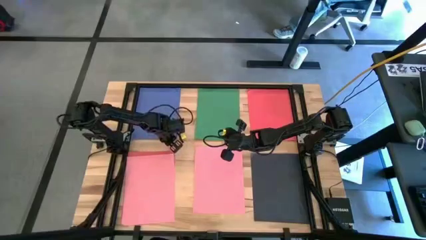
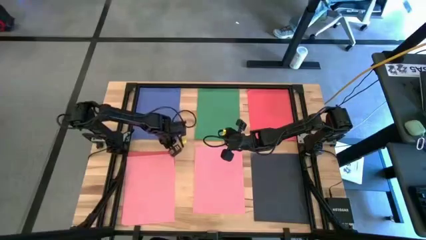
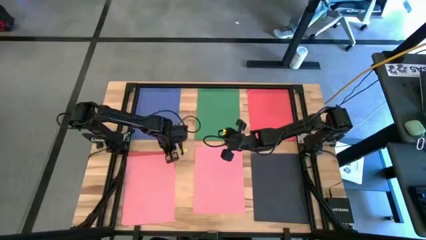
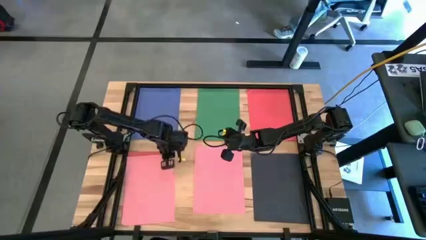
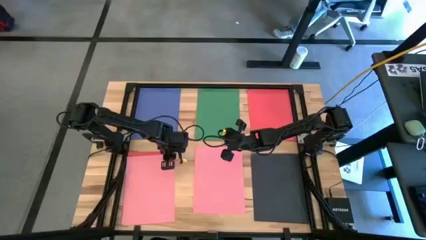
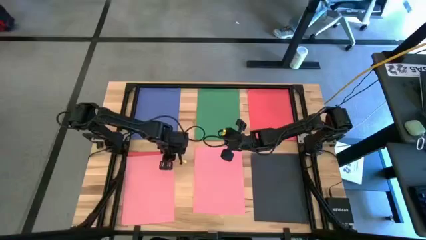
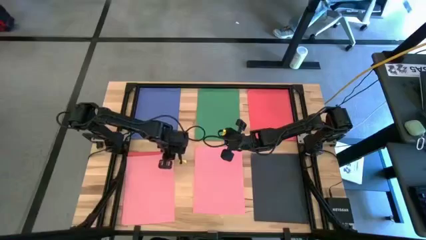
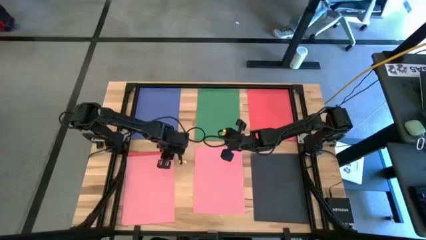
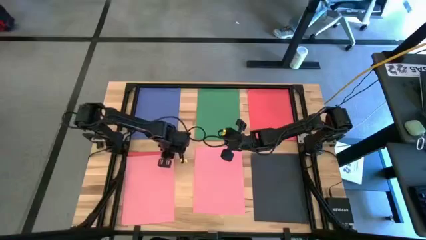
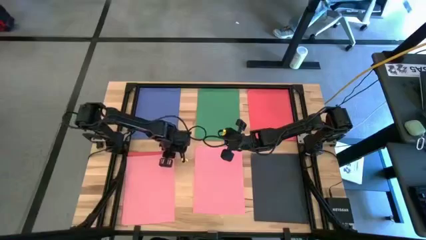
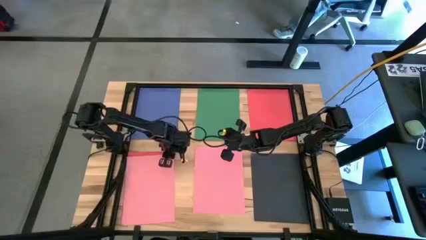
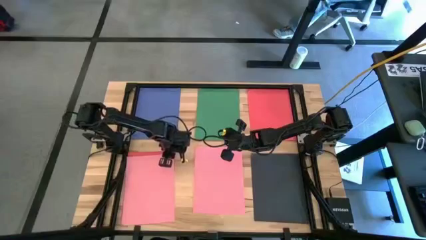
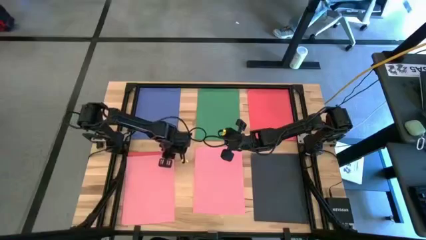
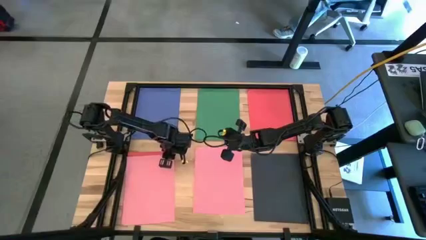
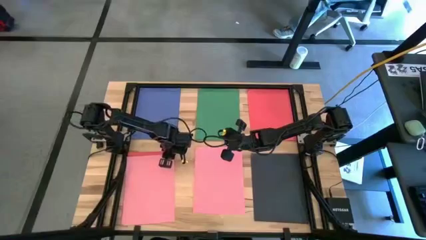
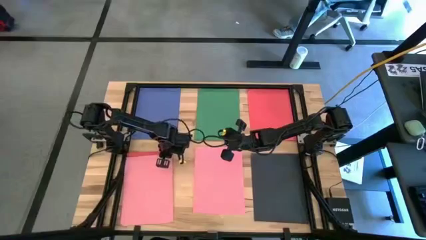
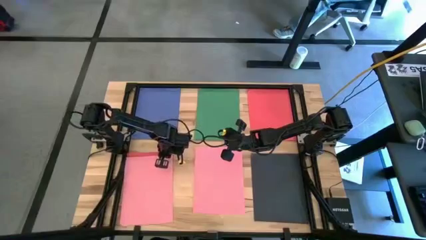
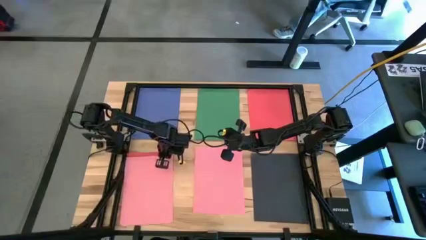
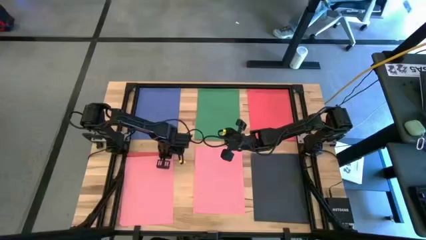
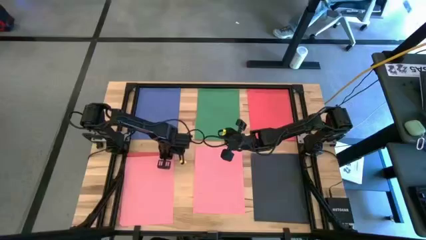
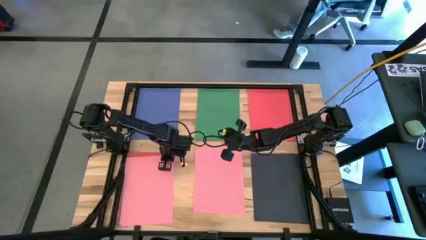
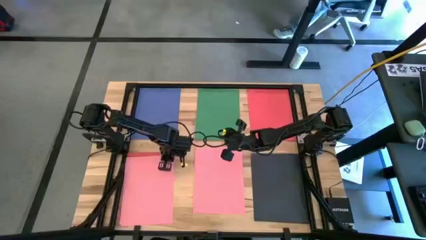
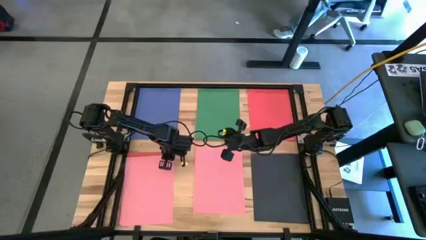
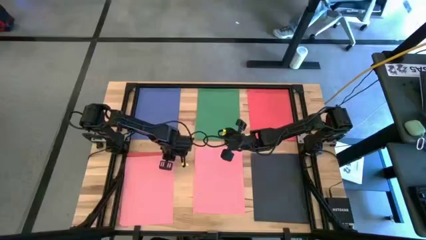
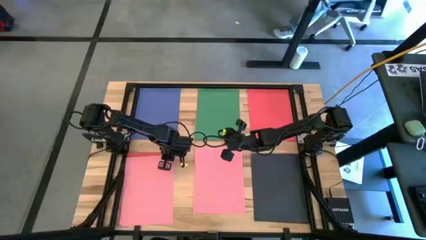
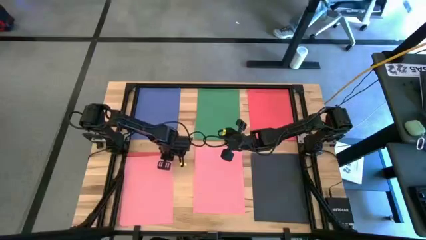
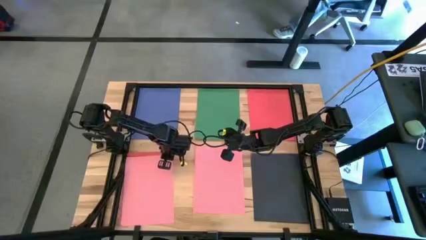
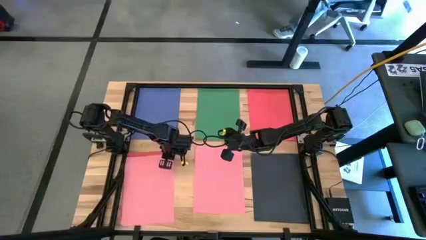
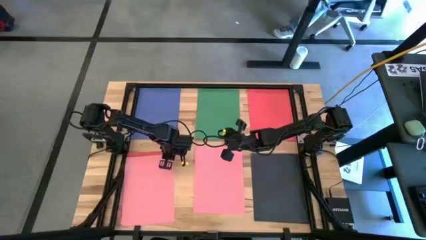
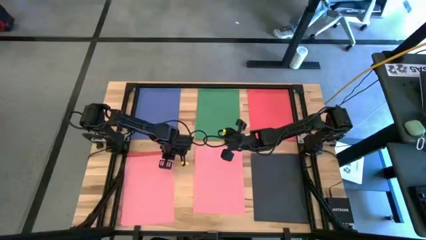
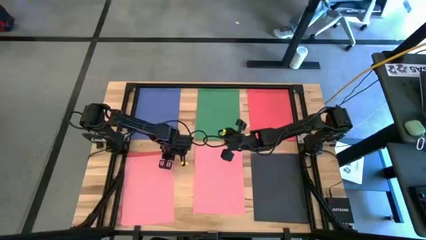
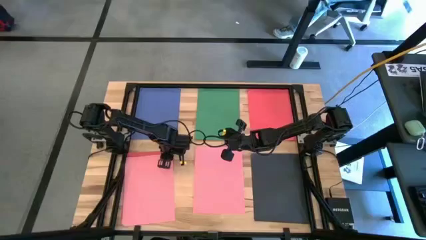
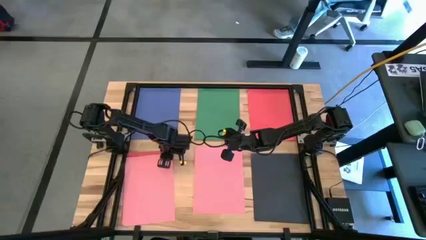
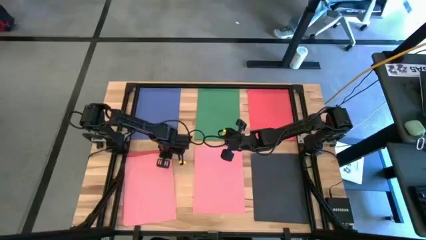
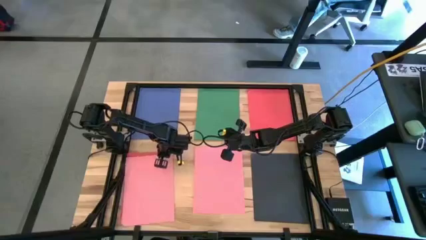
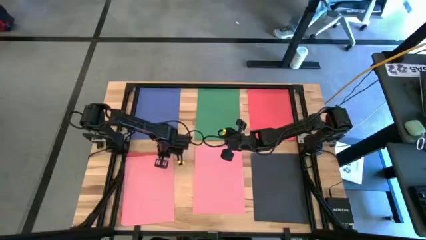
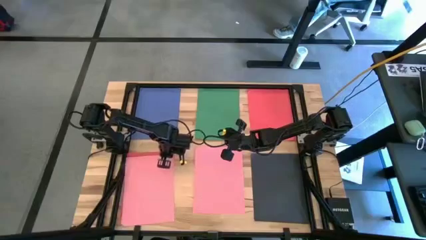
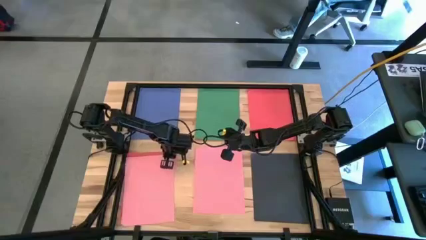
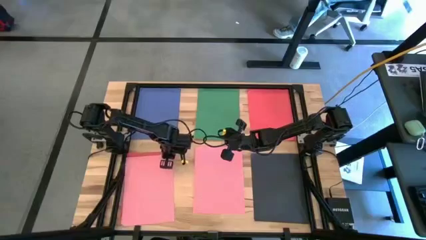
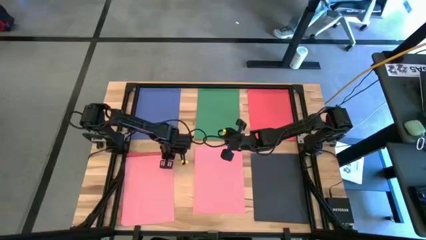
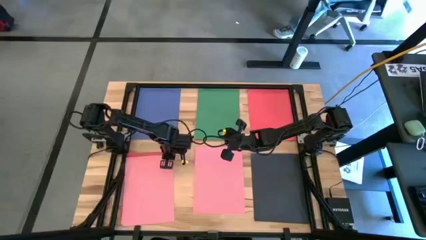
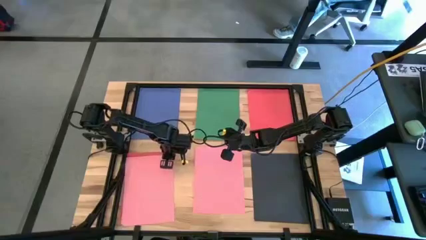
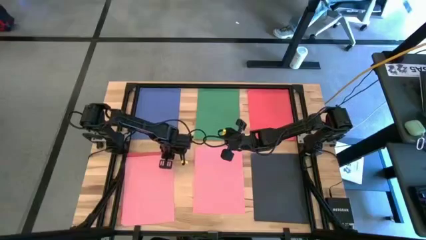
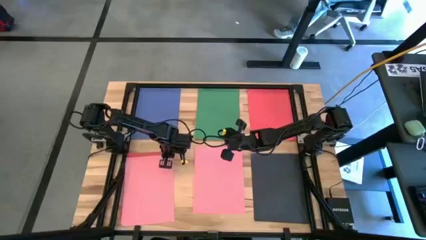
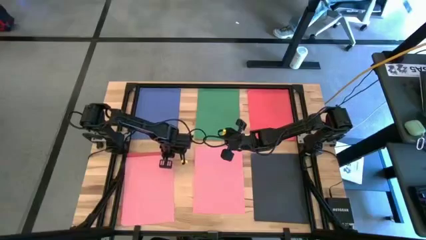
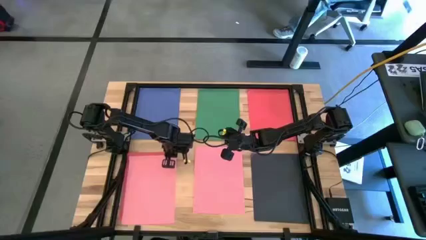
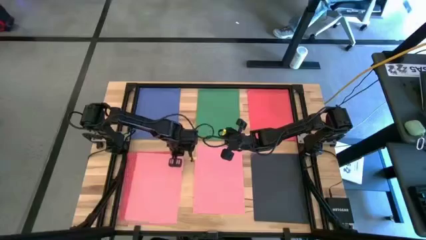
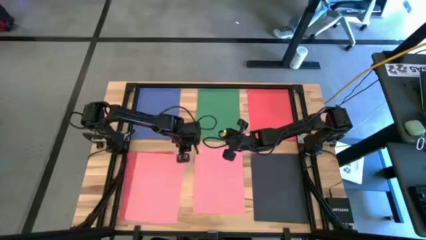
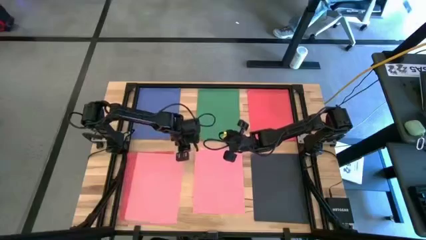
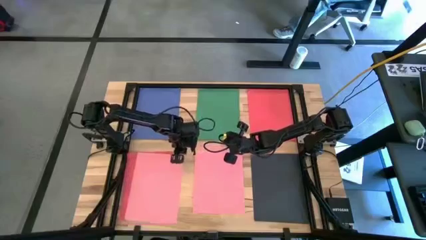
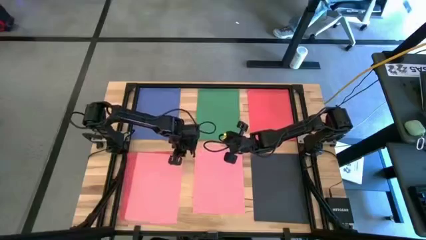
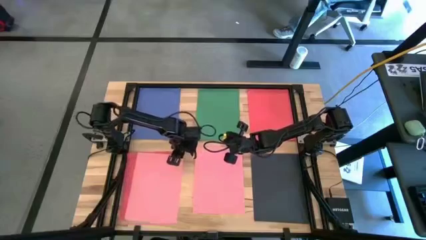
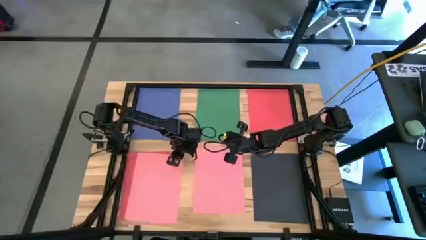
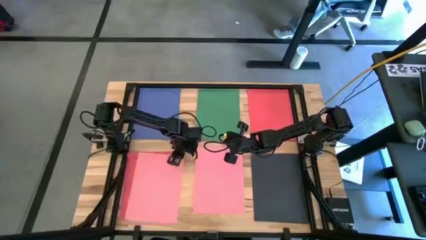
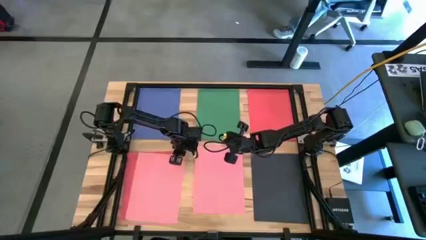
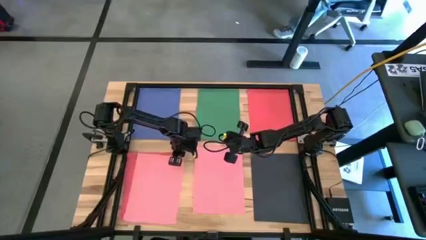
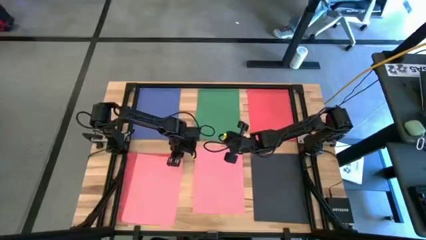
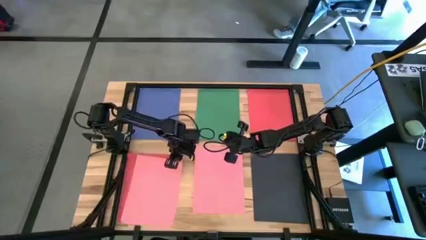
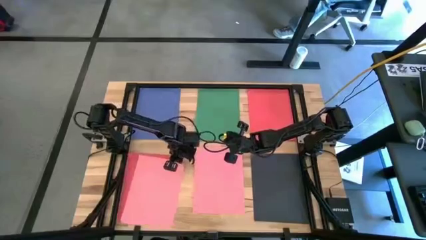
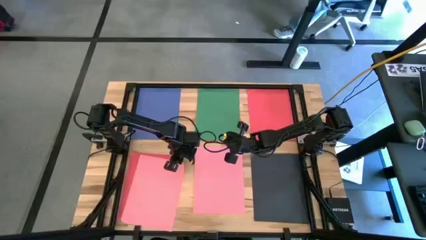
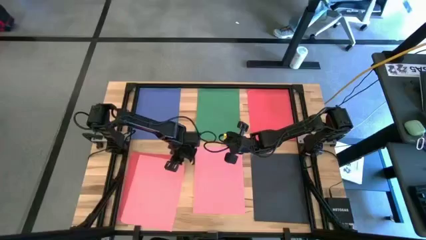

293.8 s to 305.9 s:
Task: Organize paper
Stack the pink paper on top of the other pink paper

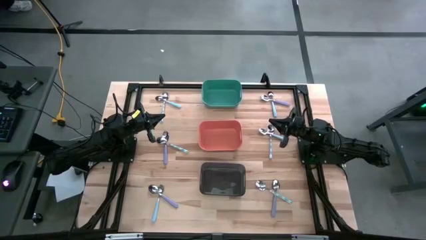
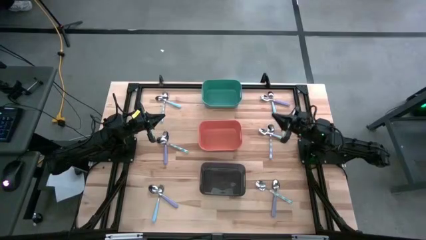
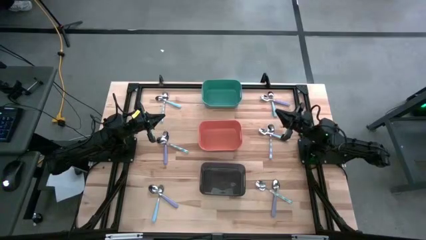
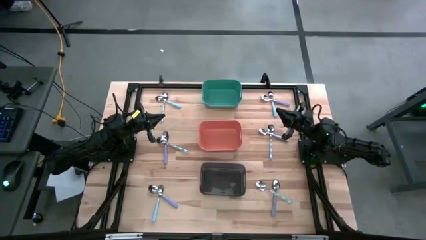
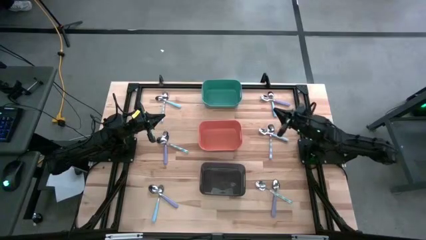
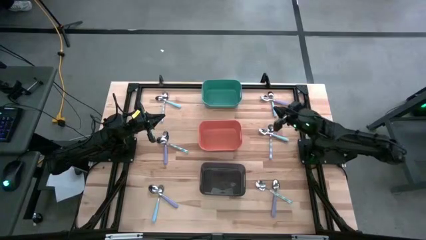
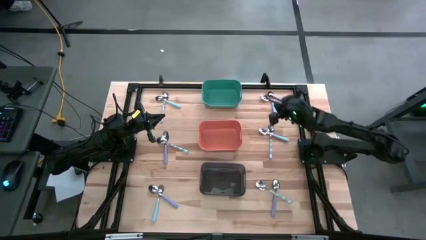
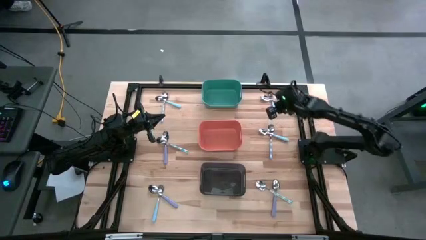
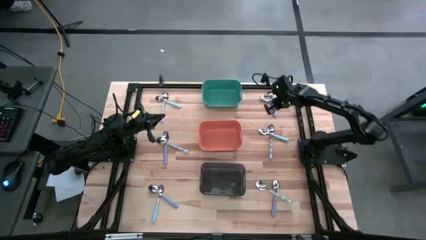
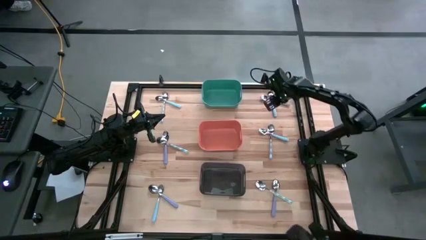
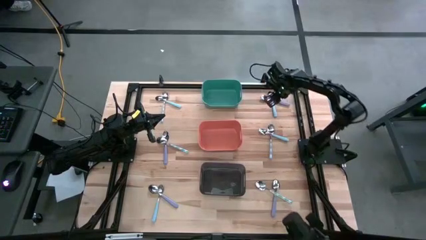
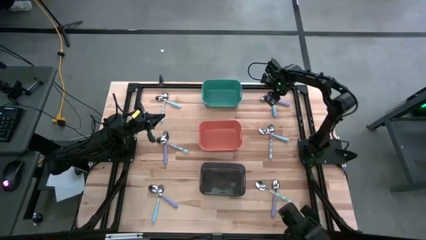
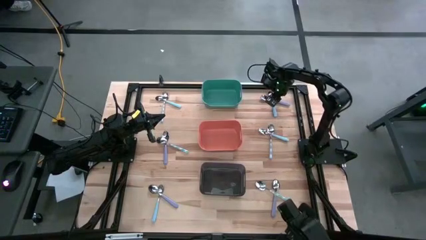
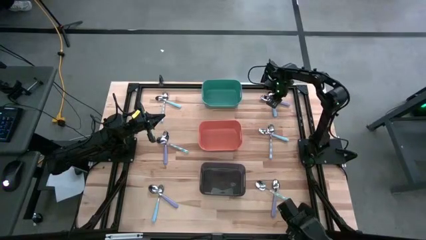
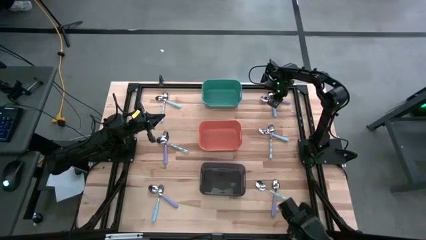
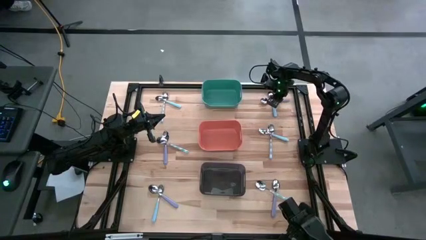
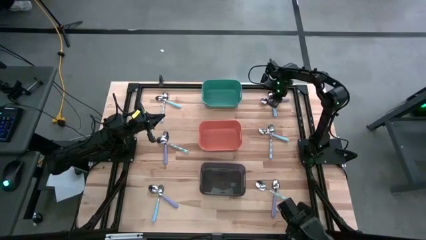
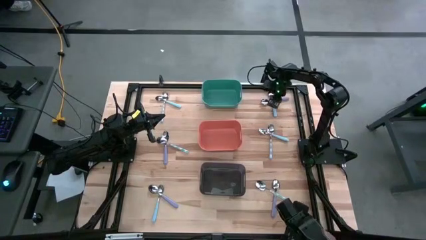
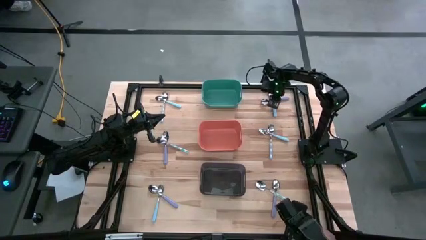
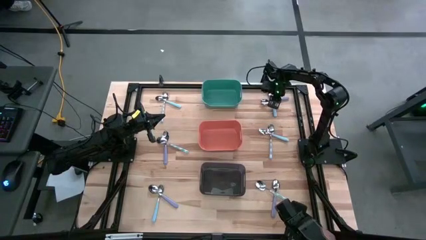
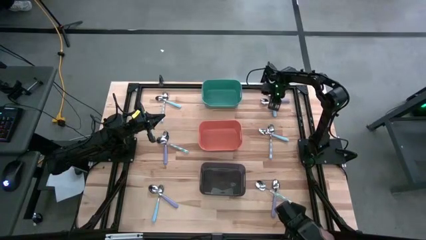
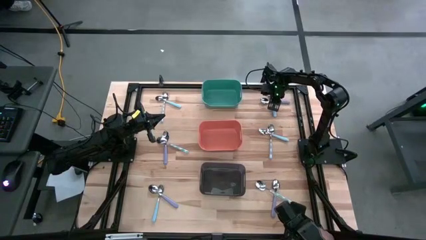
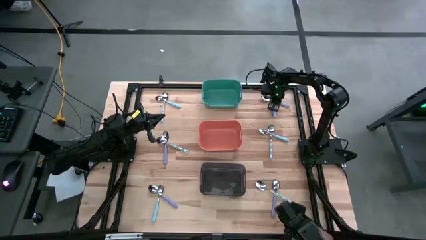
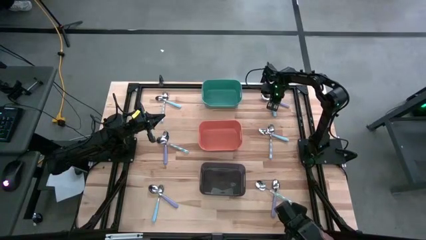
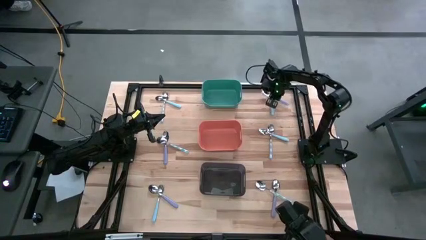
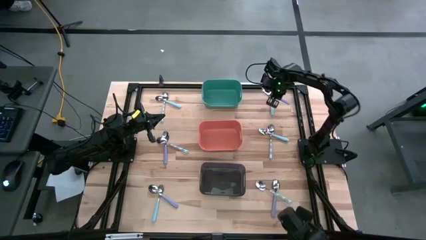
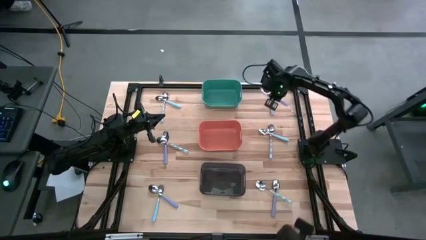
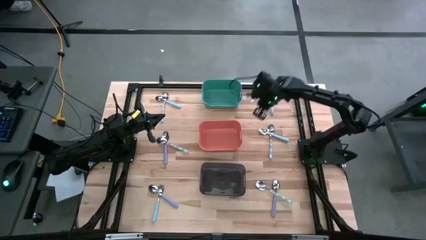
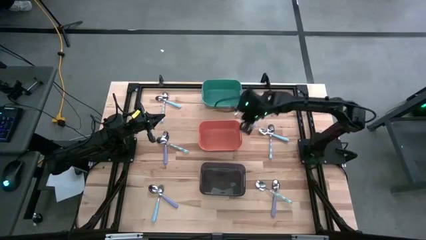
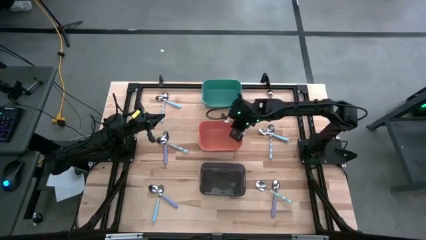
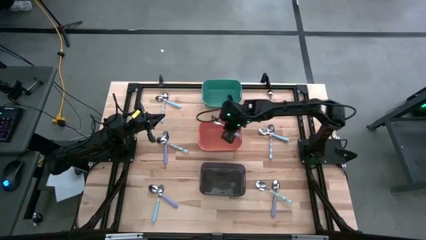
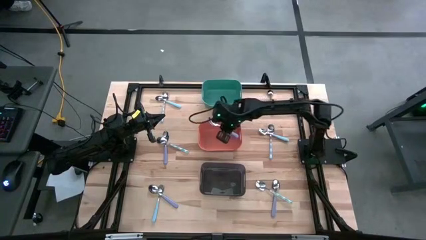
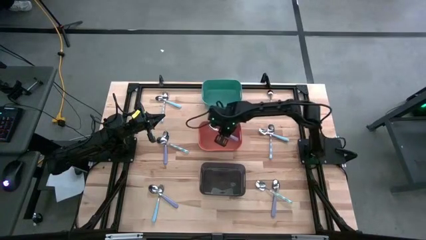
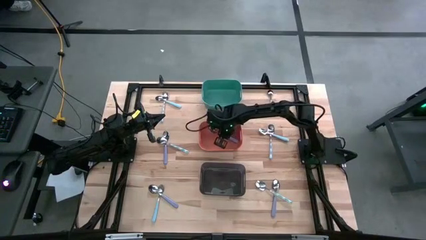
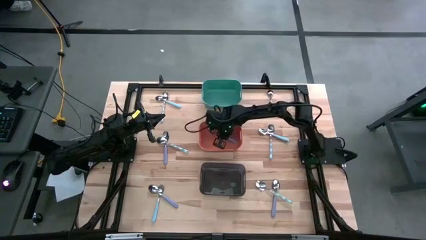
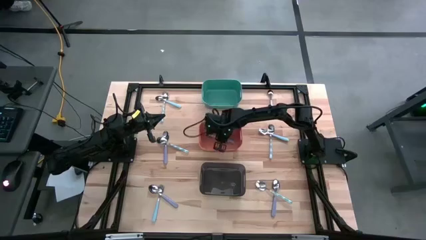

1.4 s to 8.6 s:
Task: Sort silverware by color (type)
Put the top right violet spoon into the orange bin
